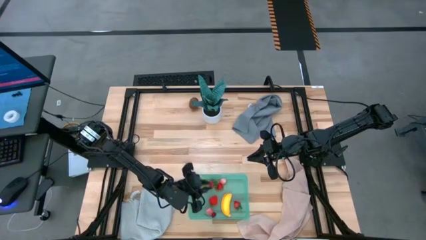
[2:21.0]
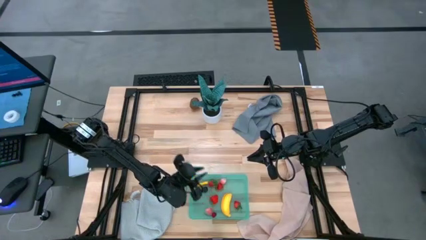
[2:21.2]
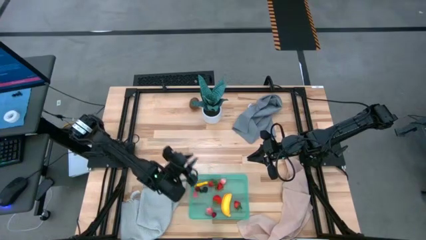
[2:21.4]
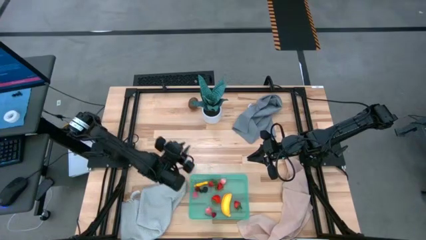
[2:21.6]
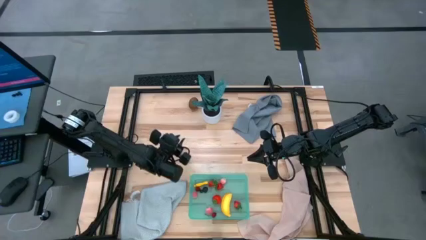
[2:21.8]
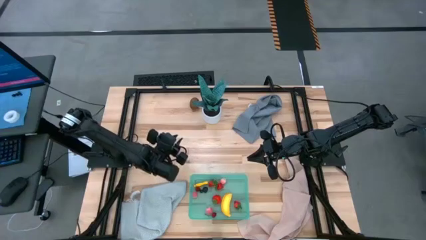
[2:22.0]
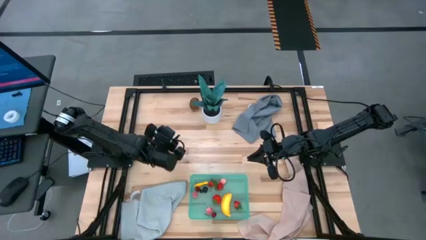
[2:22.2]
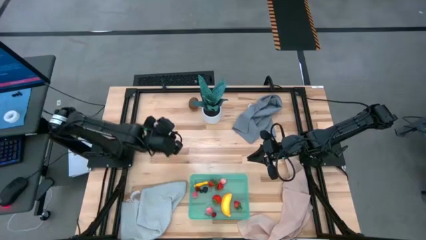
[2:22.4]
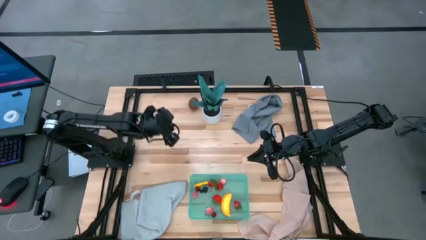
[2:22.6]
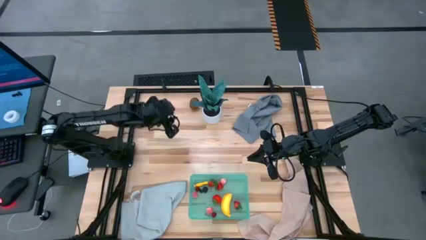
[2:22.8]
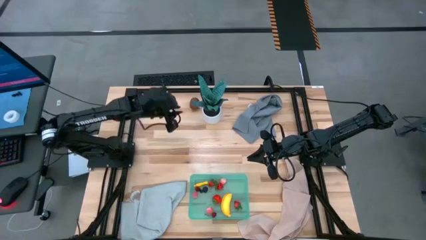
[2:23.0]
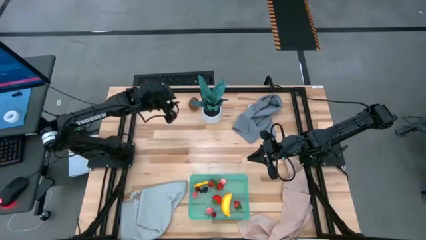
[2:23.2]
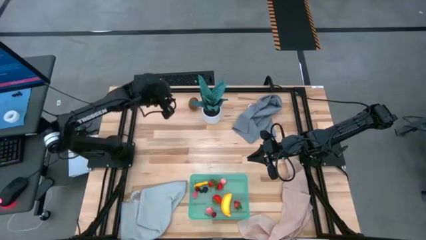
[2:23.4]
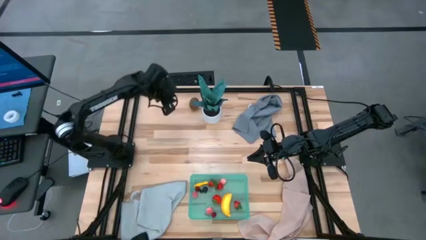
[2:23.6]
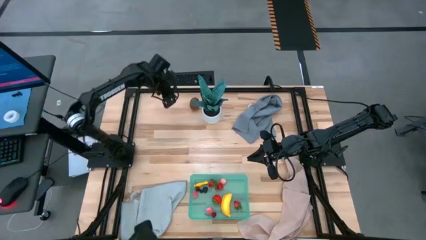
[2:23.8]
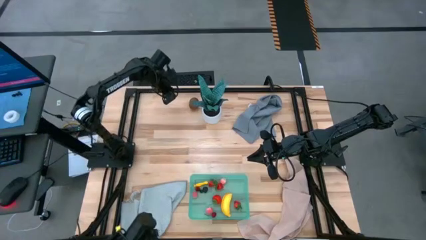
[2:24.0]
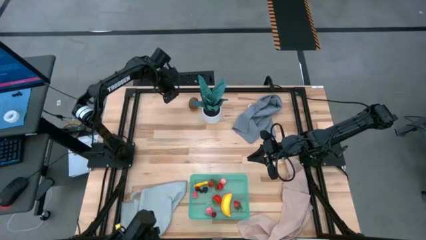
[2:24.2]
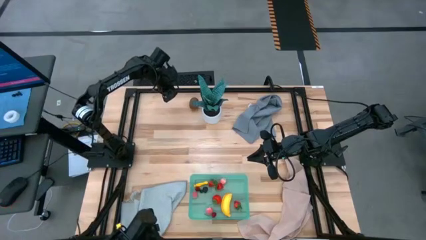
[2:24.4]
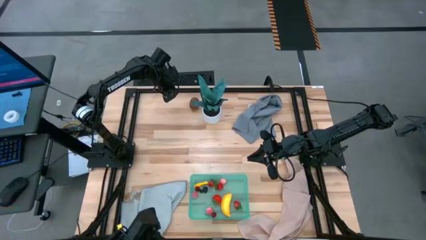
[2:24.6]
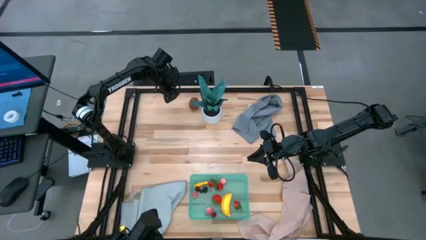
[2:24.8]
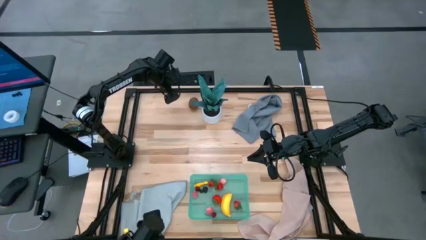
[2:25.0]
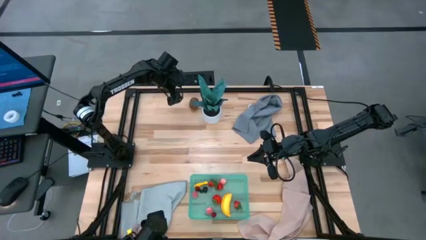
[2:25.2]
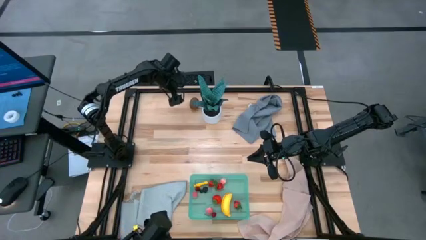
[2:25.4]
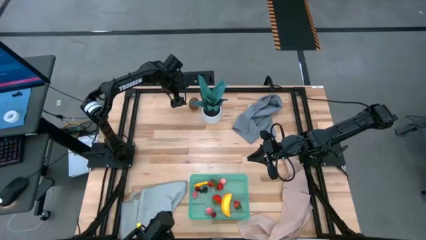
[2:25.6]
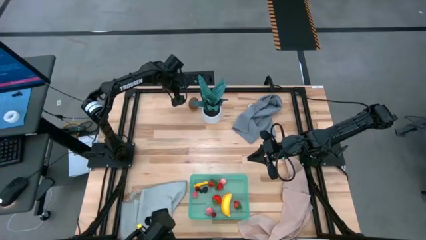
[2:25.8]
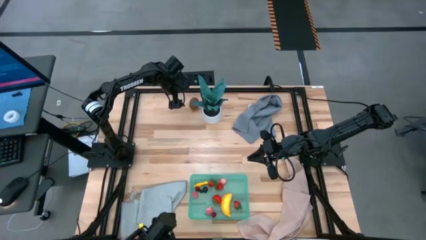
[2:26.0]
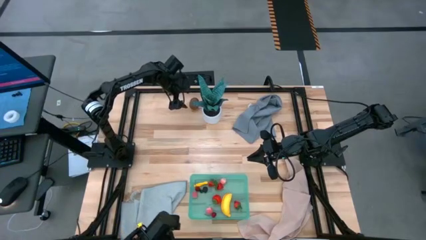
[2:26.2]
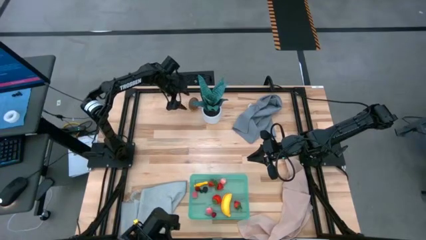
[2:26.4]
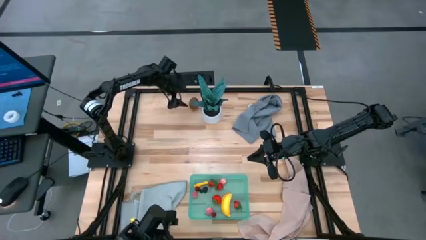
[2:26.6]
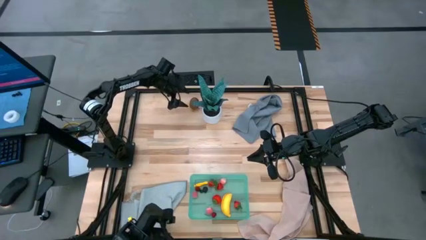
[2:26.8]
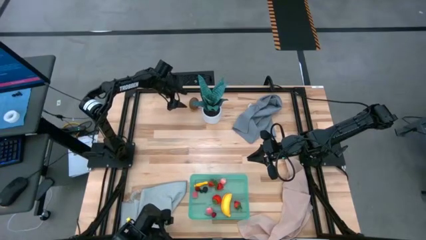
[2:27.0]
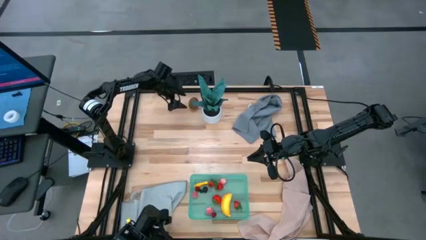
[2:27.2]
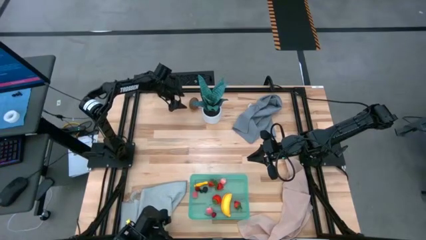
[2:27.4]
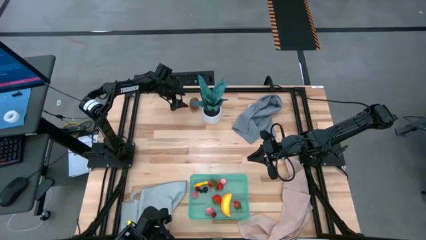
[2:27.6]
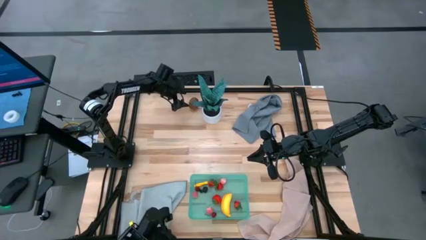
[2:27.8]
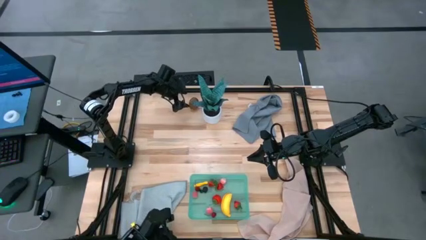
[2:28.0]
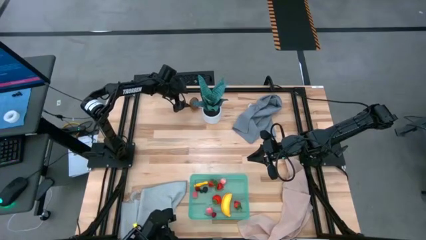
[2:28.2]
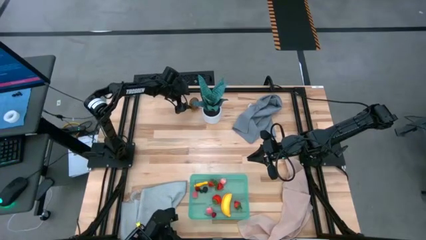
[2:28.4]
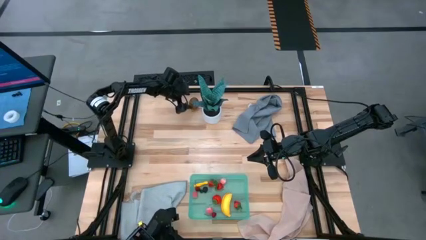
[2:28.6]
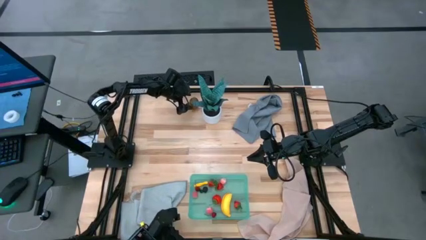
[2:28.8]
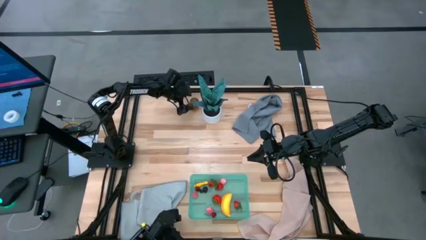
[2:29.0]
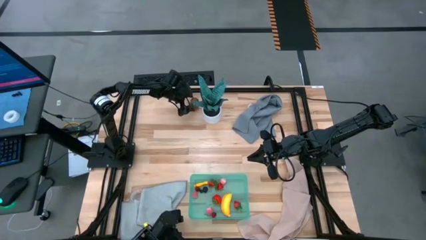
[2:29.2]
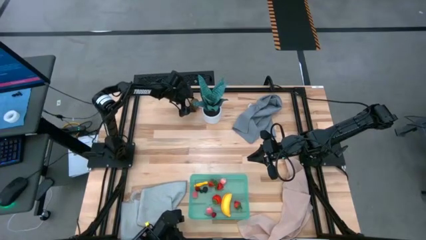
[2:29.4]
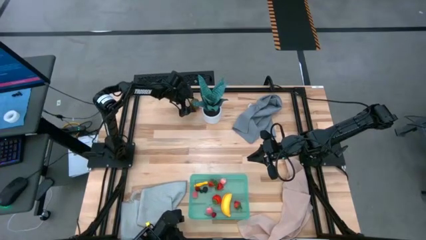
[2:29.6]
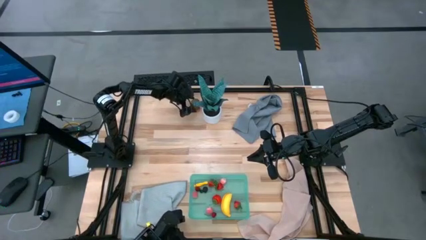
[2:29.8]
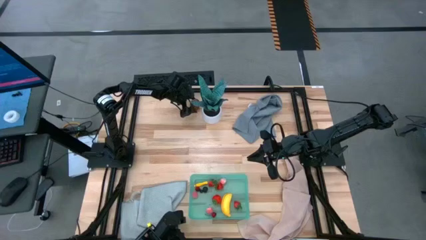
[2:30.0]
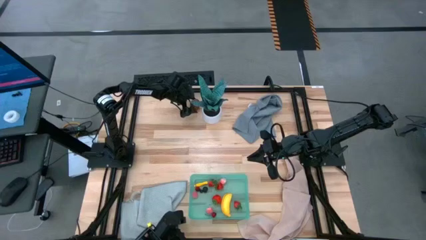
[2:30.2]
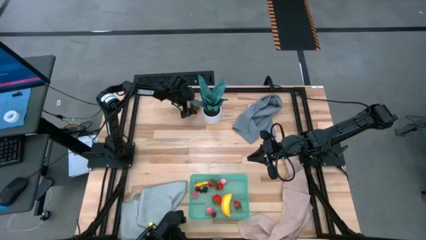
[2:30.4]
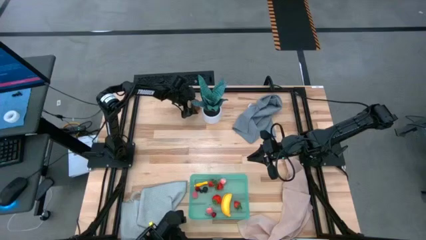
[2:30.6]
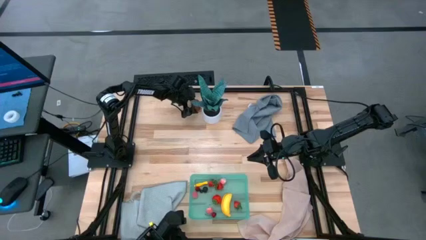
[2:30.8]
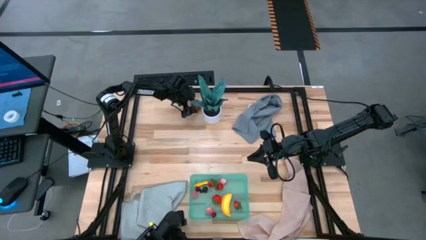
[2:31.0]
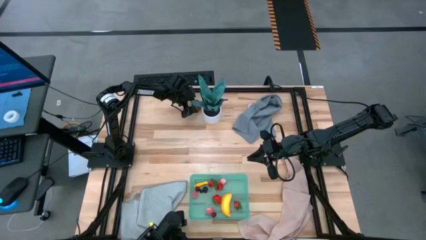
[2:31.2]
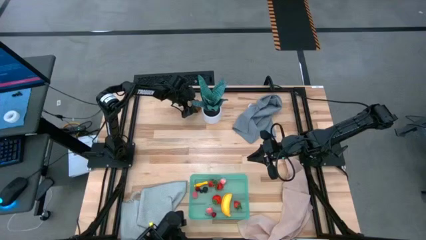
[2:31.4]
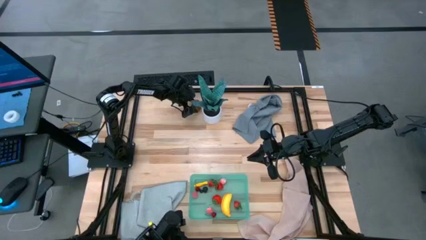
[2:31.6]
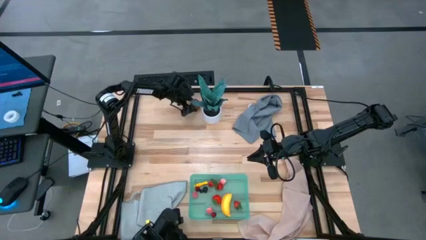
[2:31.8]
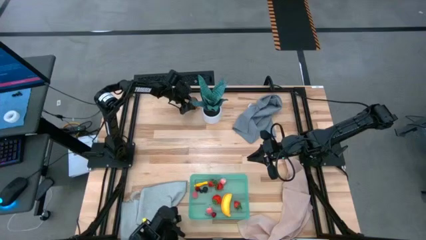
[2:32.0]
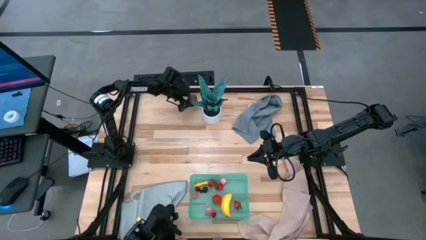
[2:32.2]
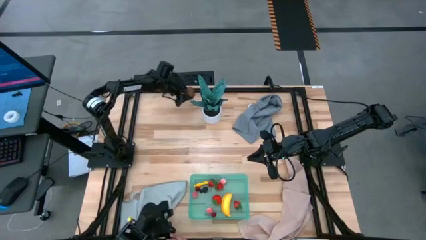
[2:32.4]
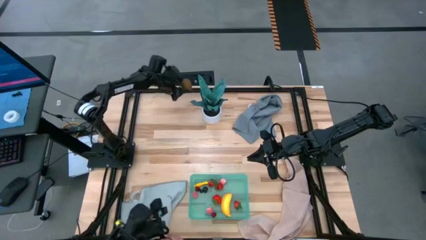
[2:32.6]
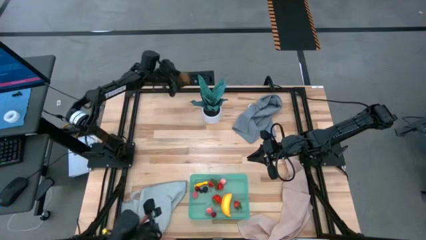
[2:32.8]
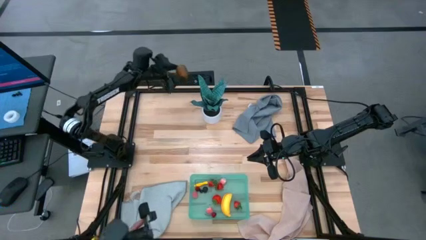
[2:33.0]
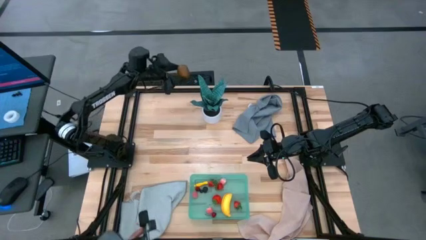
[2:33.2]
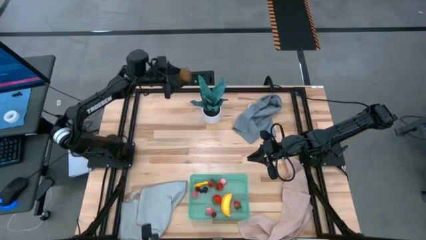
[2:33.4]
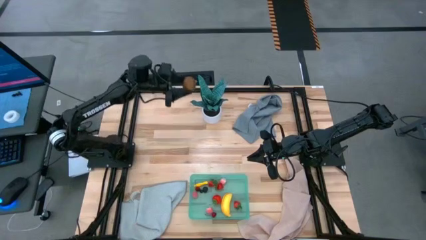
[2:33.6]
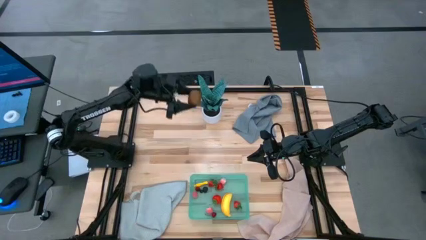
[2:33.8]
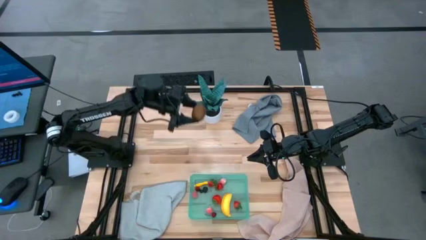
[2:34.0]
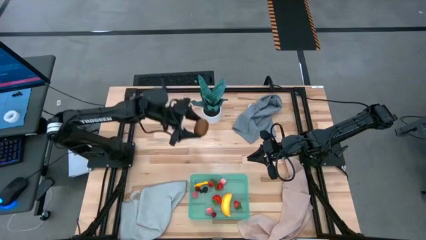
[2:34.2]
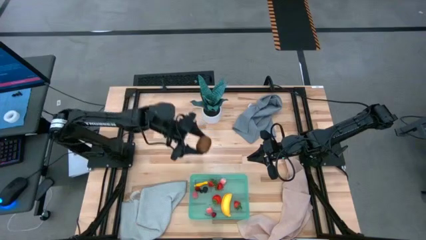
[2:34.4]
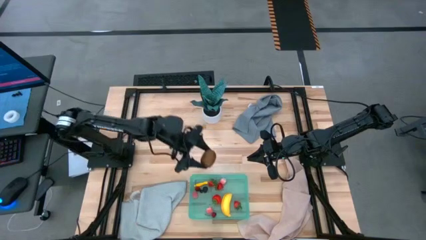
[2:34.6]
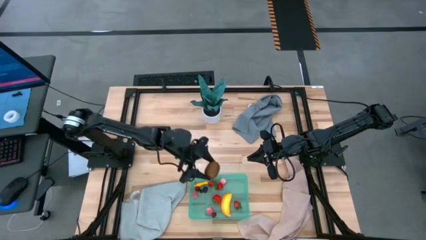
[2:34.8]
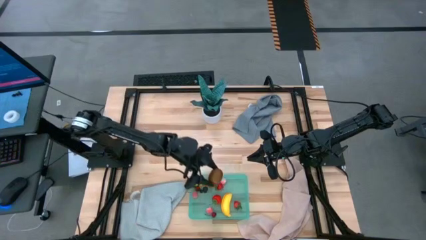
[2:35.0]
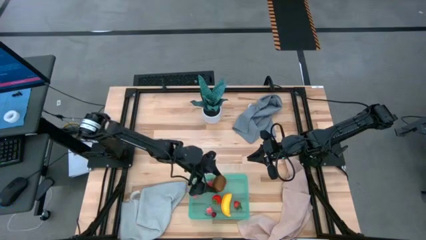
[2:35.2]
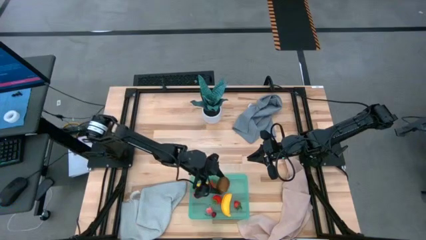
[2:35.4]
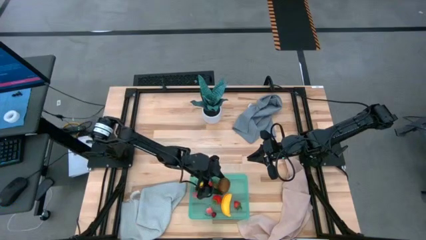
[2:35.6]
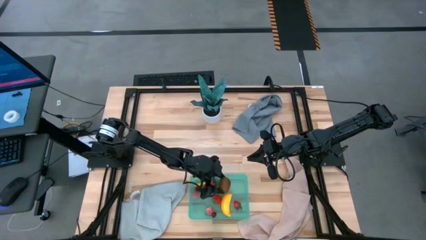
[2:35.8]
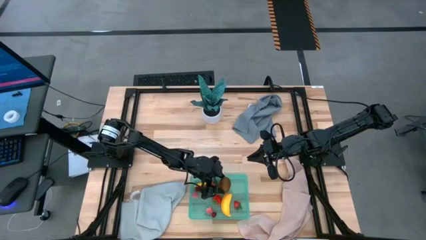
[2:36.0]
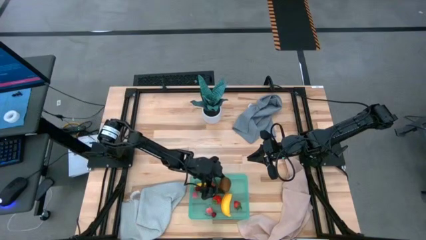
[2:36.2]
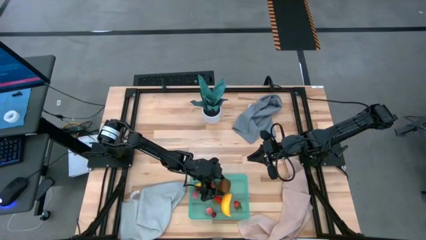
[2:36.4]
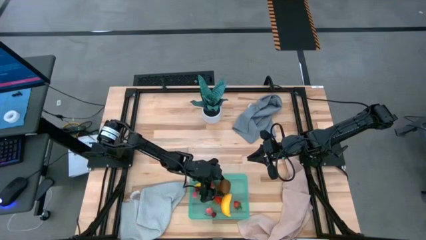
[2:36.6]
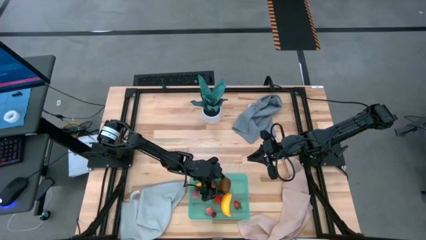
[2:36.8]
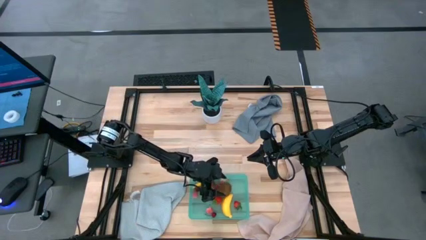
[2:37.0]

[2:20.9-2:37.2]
Task: Pick and placing Produce into tupperware
Put the green kiwi into the green bin
